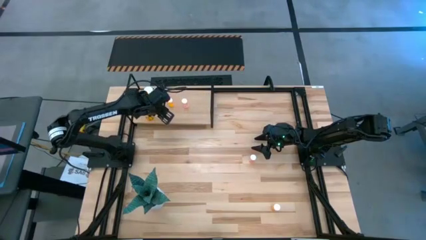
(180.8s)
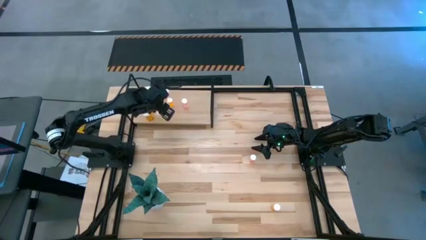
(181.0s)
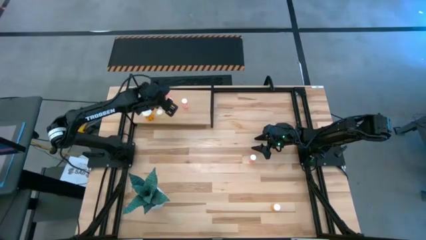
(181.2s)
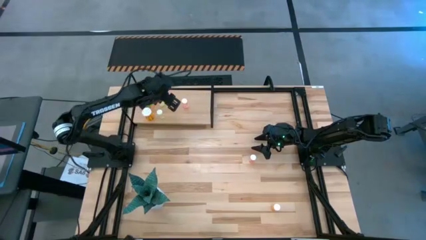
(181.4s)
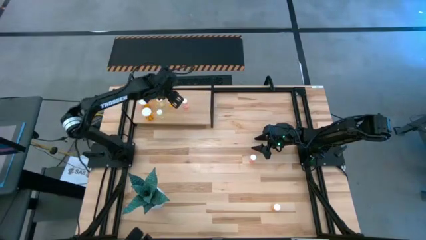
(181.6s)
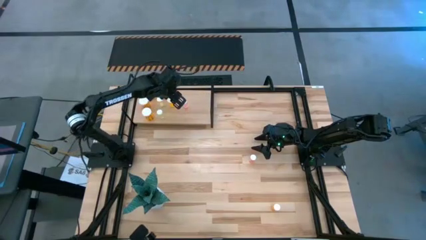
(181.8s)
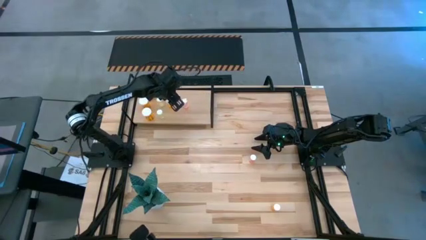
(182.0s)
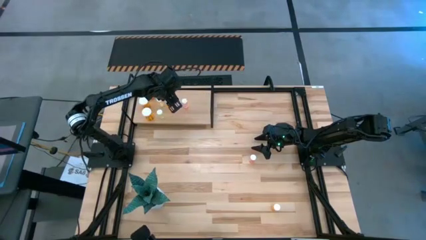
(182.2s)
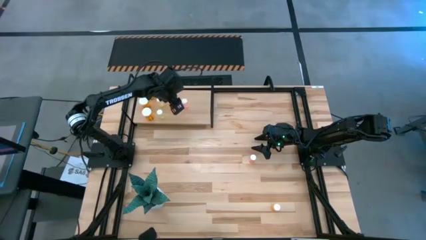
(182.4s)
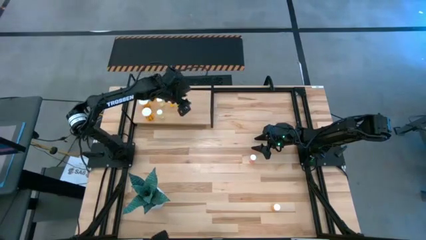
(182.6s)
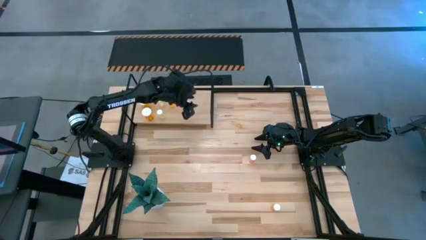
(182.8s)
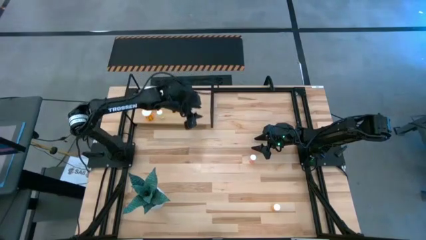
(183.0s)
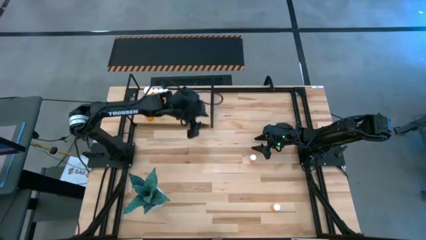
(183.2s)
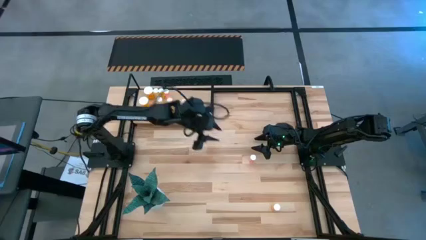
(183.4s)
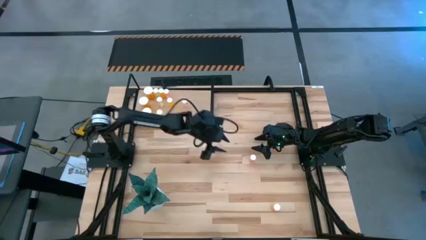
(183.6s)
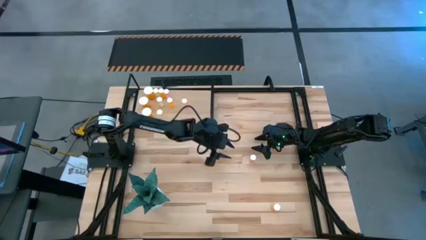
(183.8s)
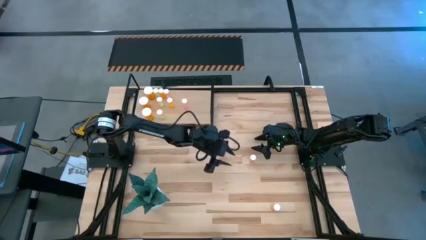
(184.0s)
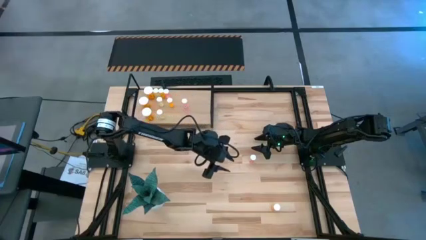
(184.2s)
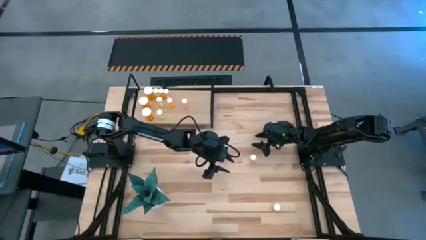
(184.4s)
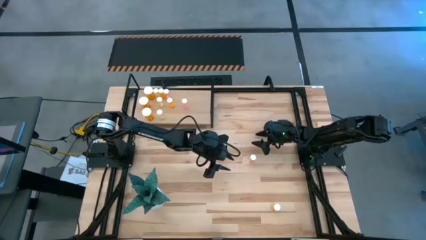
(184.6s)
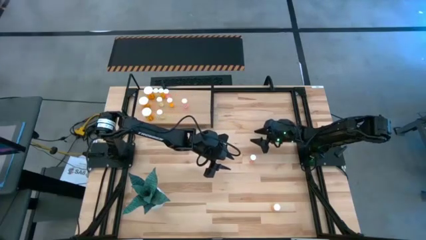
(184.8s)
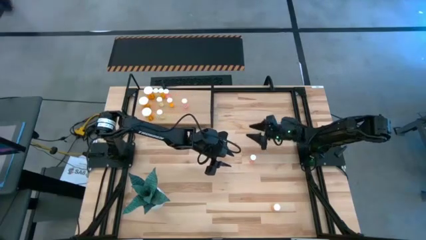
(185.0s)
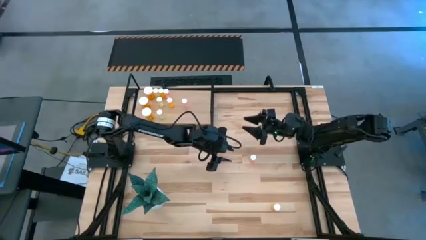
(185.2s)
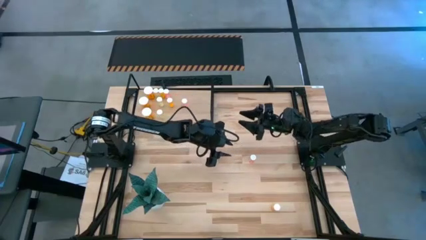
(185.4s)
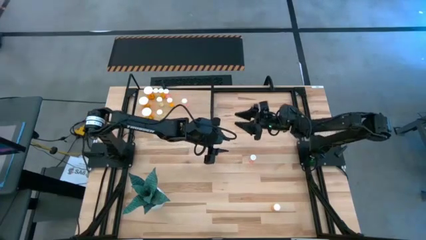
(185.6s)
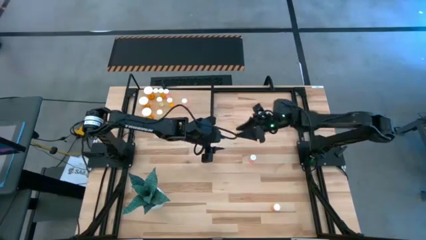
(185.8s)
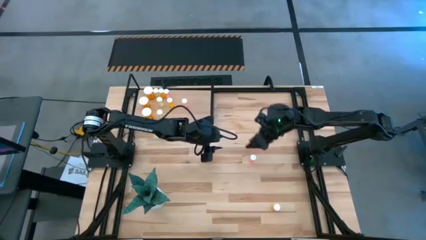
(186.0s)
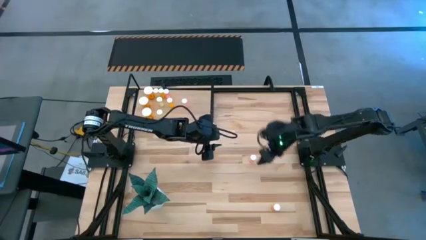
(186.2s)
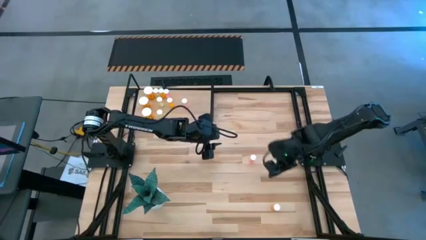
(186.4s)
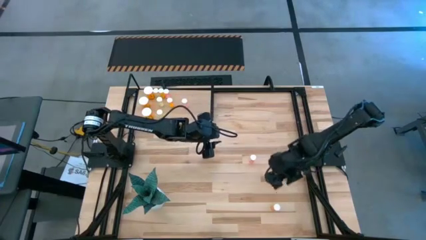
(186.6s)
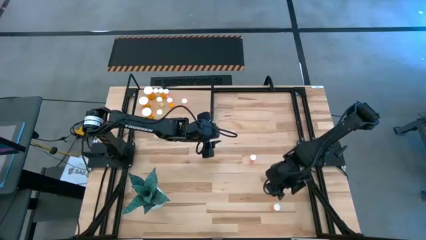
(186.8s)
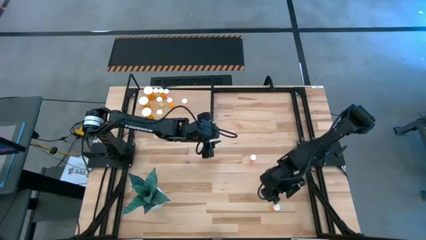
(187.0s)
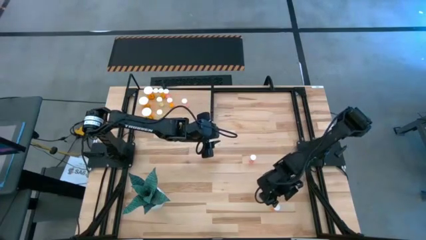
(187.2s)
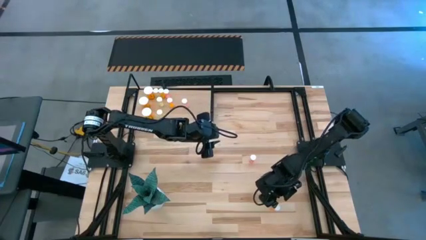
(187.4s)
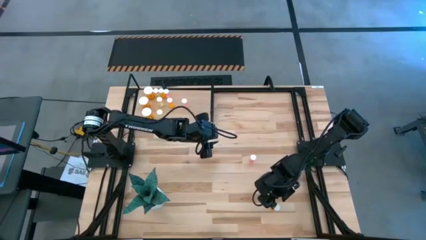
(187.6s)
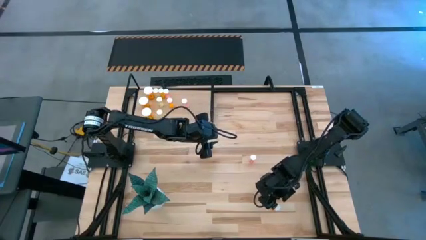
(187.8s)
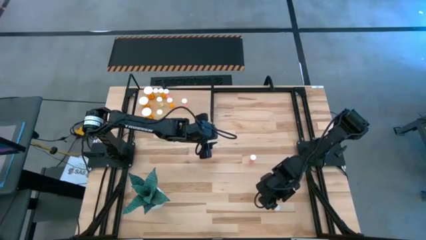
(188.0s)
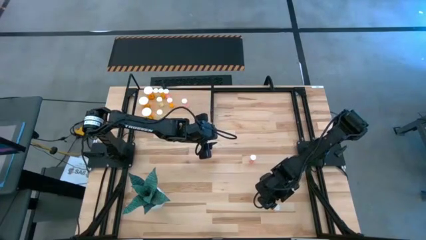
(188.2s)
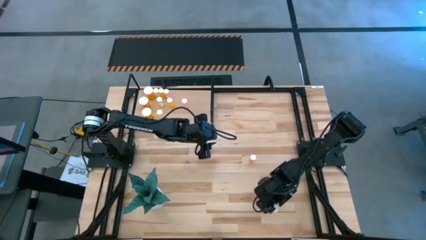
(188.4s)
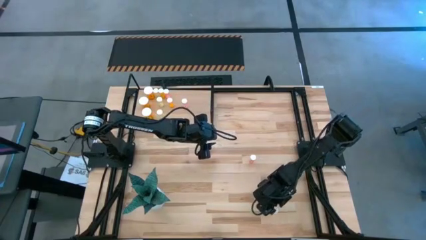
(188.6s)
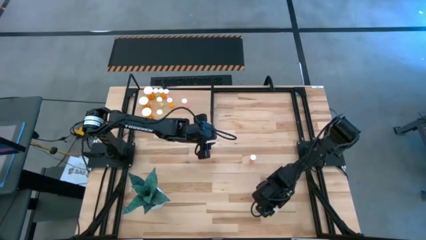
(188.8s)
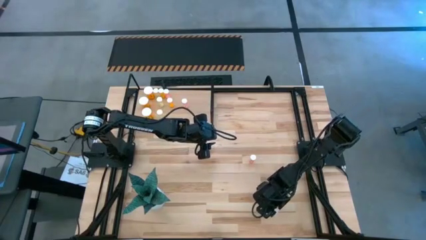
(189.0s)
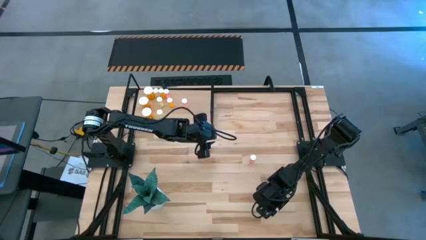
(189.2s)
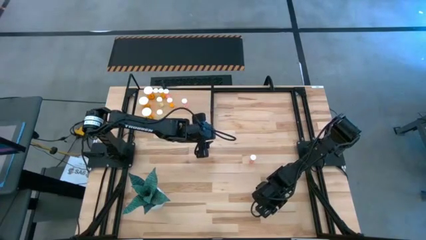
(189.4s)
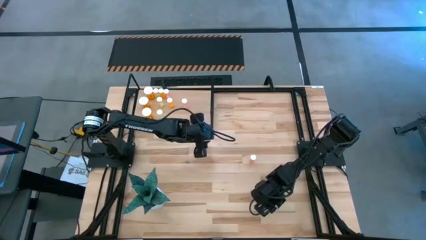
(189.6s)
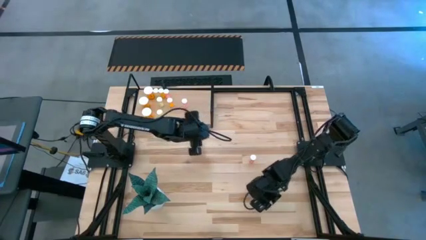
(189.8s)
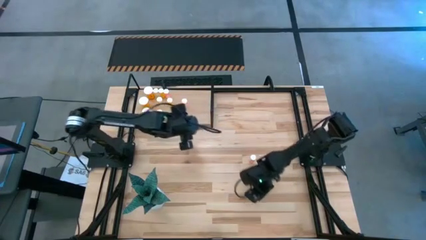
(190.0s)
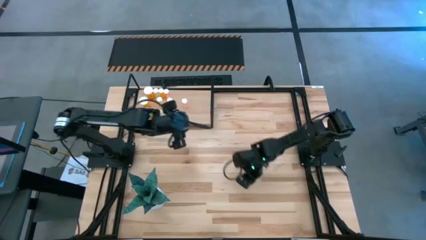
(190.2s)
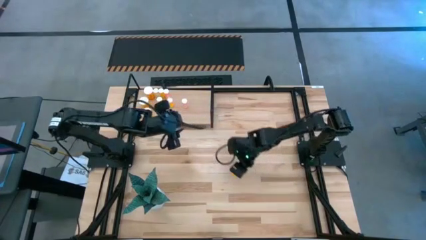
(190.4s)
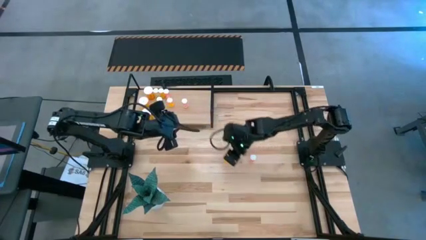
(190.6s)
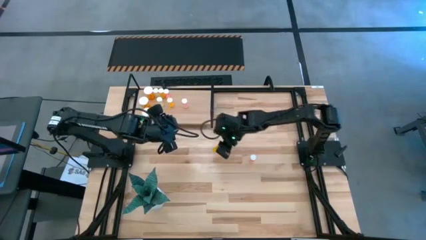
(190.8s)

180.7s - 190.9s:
Task: Pick and place medicine bottles onto shelf by color
Put the small orange pill bottle aligned with the other orange pill bottle on the shelf
